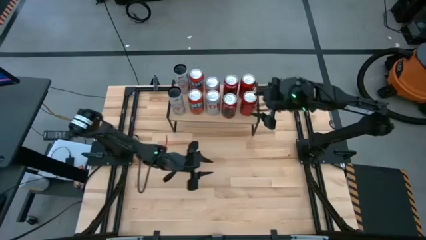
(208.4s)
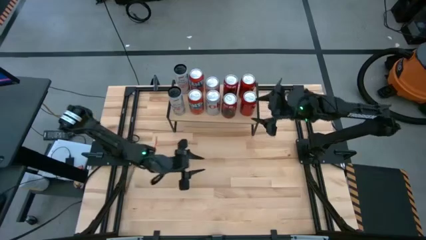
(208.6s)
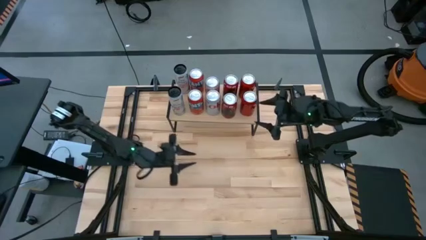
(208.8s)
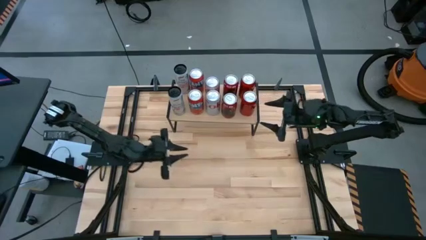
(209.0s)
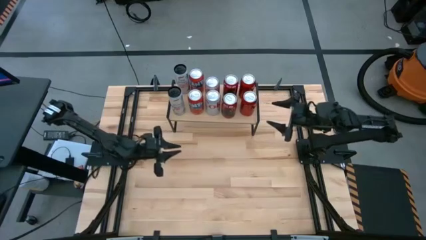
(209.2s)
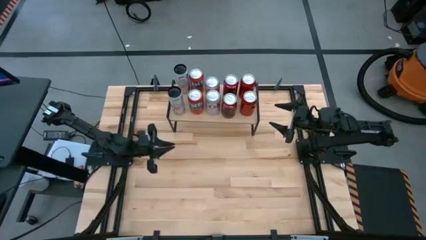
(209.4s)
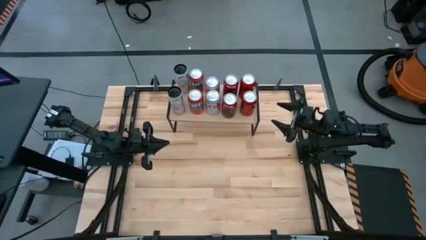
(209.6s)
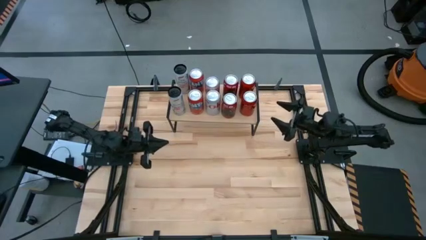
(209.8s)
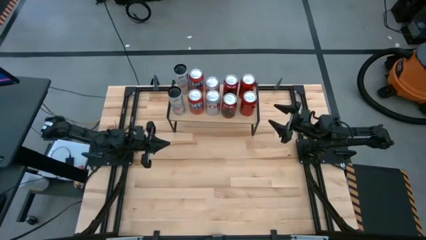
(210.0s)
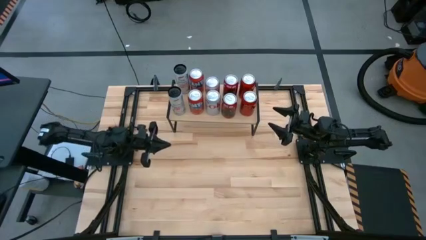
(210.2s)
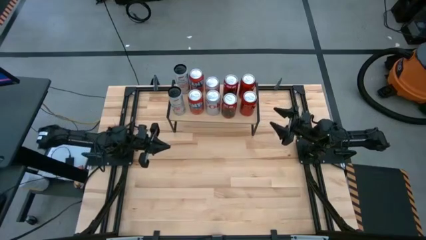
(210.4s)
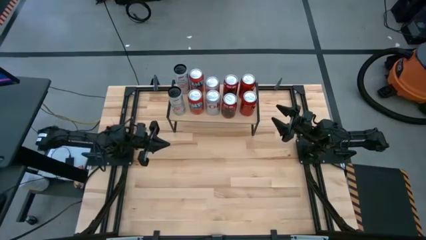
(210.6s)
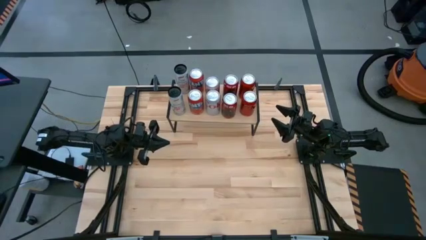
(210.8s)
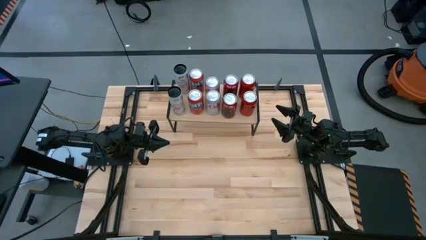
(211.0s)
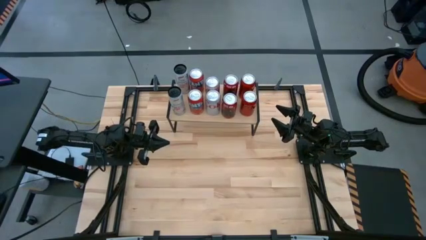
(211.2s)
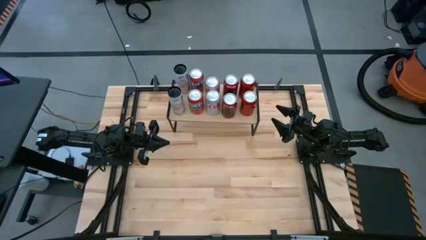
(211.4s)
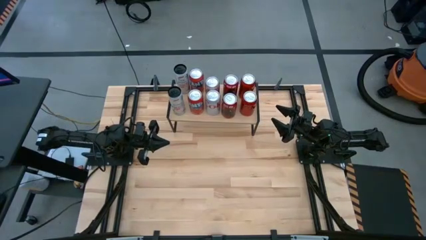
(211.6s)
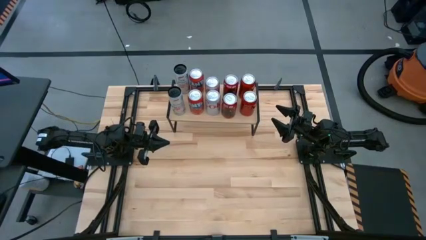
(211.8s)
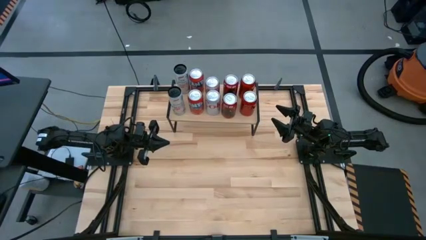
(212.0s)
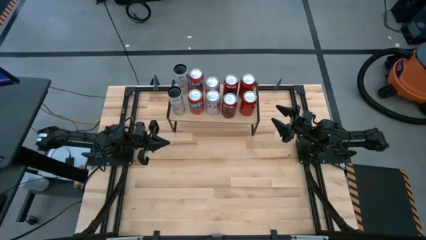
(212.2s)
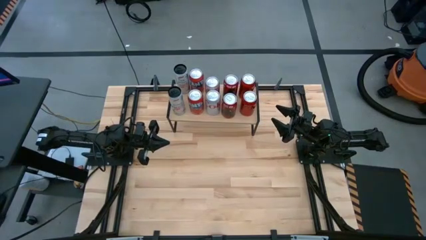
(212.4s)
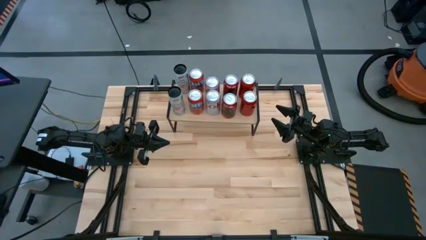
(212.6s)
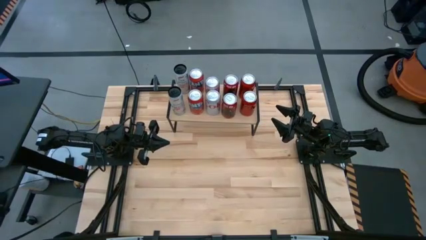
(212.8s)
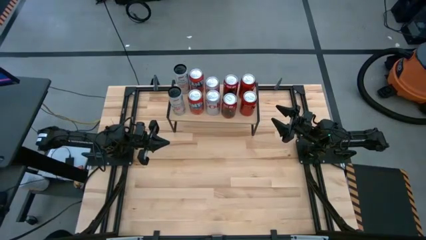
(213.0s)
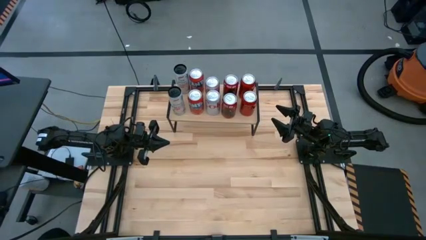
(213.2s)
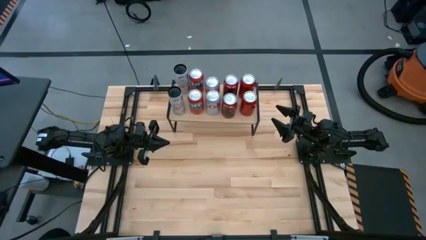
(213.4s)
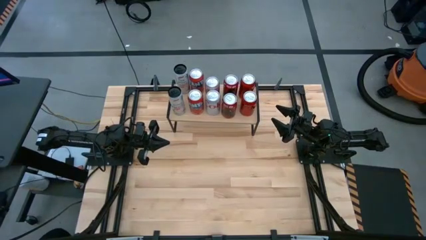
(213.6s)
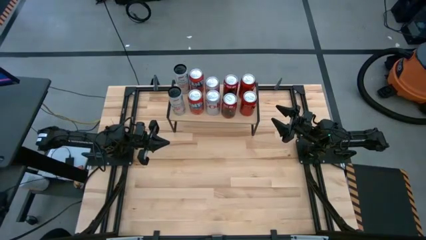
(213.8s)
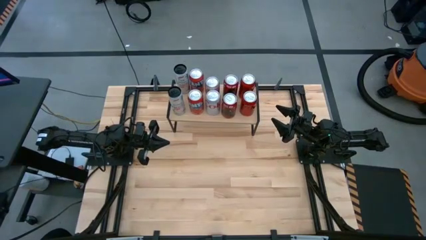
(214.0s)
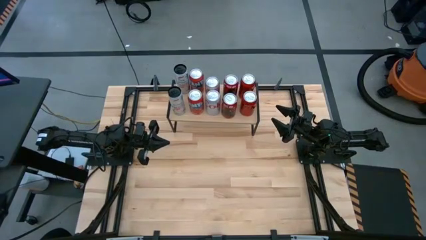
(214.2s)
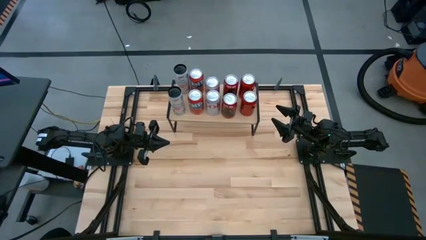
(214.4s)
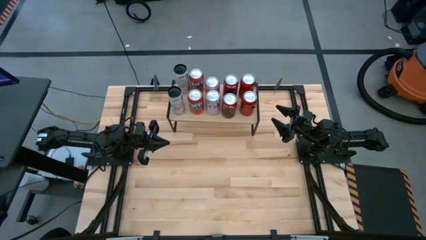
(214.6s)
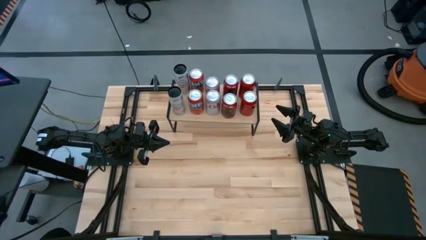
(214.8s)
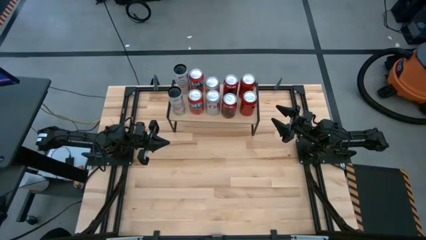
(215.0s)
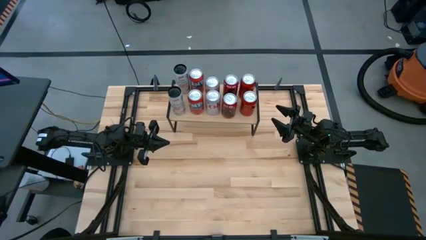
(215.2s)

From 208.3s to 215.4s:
Task: Place canned beverage on shelf
Return to home position

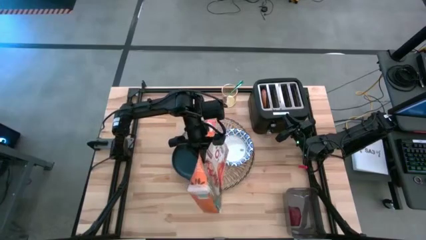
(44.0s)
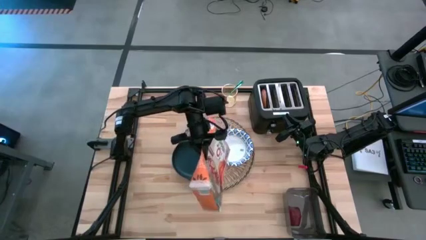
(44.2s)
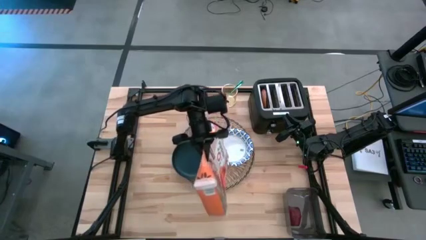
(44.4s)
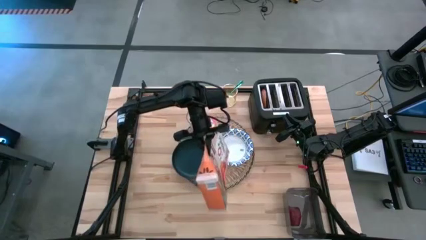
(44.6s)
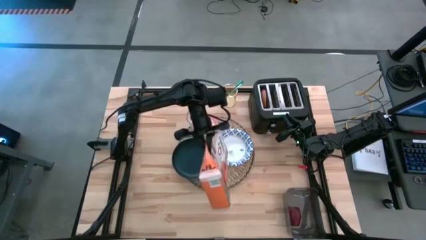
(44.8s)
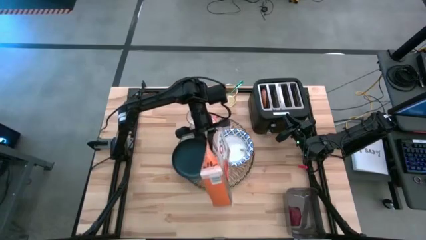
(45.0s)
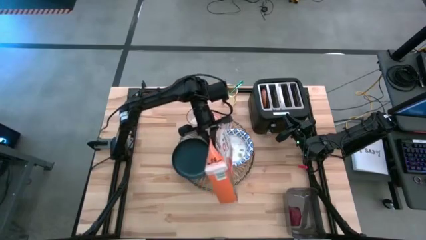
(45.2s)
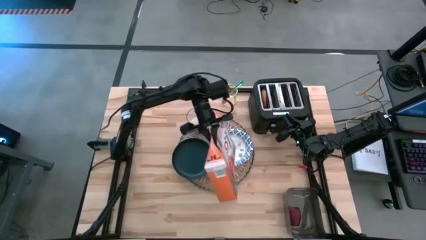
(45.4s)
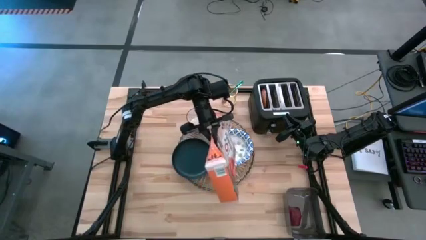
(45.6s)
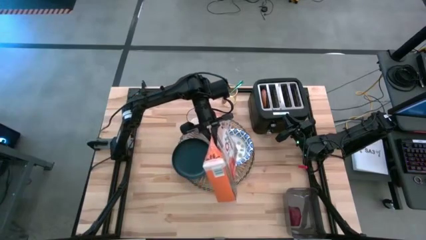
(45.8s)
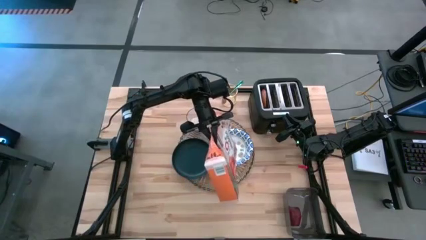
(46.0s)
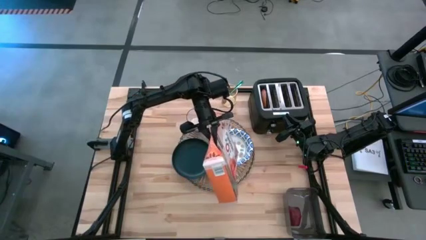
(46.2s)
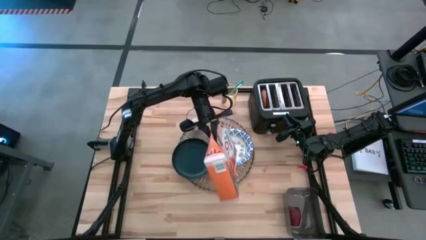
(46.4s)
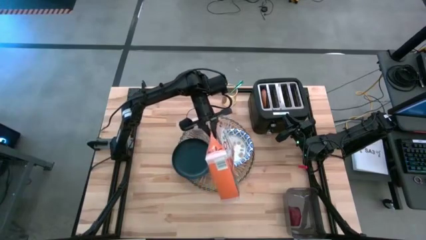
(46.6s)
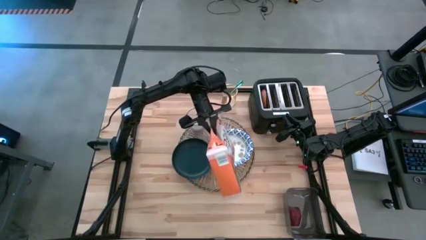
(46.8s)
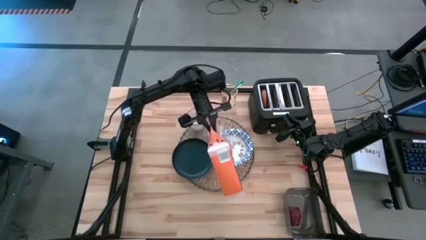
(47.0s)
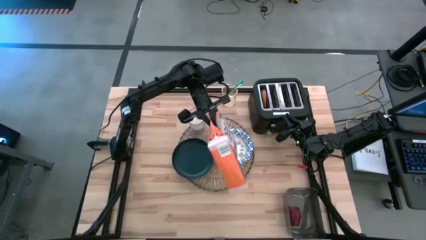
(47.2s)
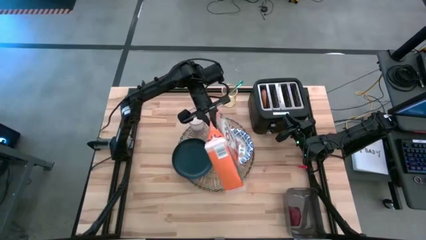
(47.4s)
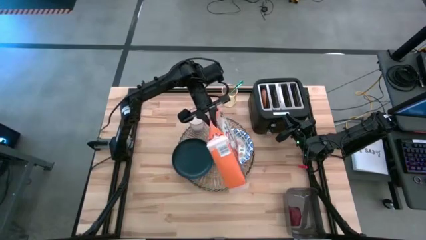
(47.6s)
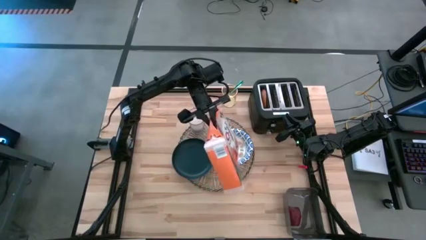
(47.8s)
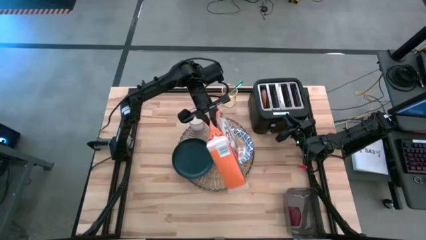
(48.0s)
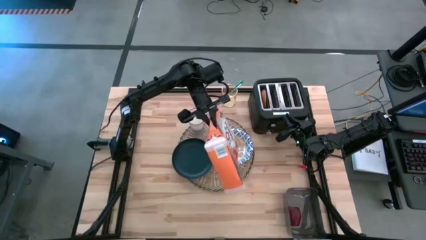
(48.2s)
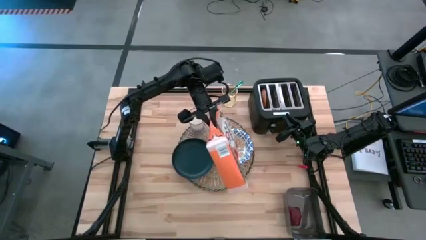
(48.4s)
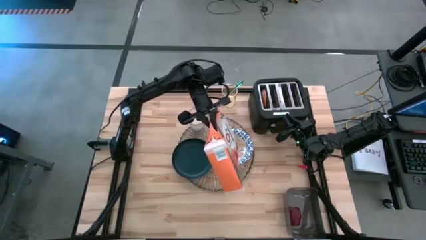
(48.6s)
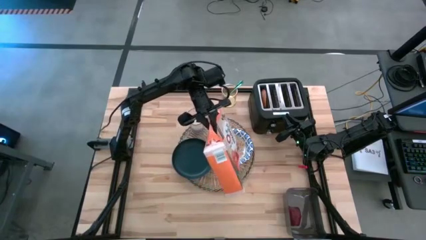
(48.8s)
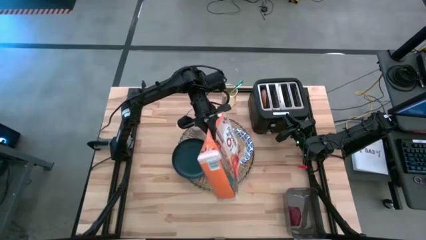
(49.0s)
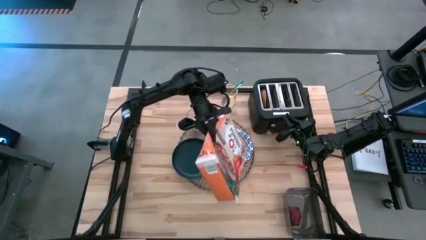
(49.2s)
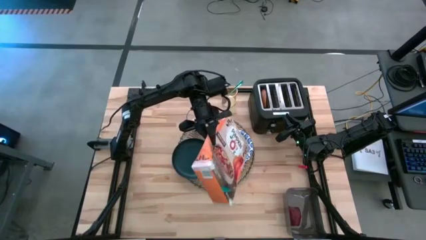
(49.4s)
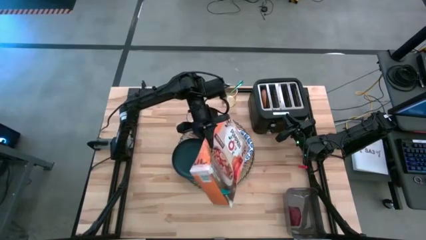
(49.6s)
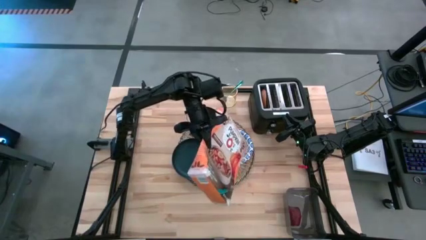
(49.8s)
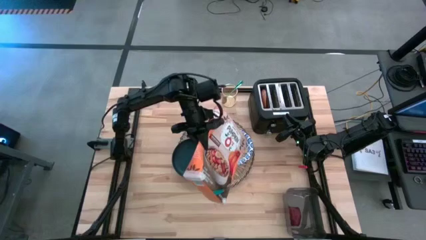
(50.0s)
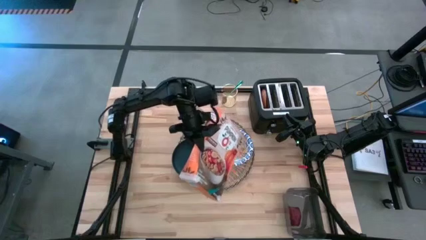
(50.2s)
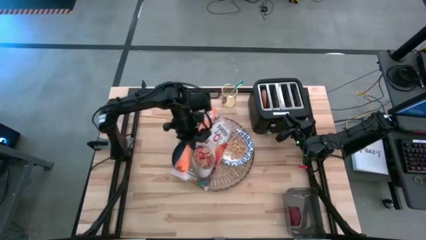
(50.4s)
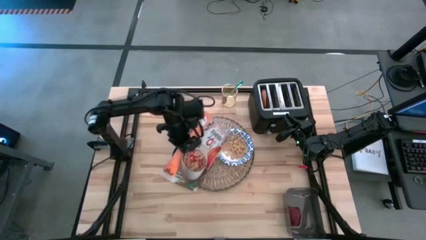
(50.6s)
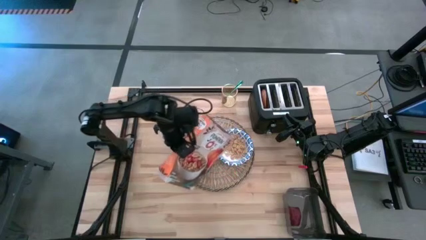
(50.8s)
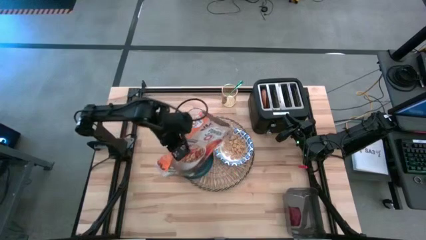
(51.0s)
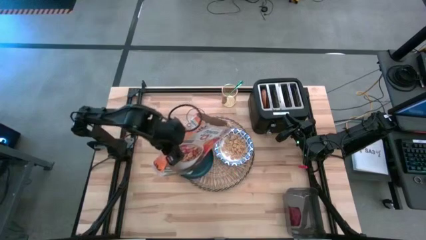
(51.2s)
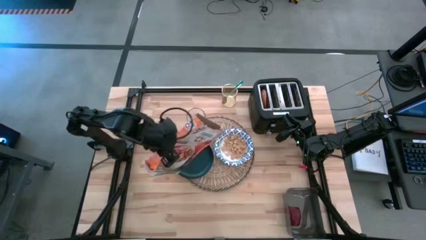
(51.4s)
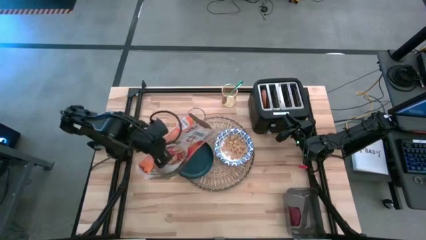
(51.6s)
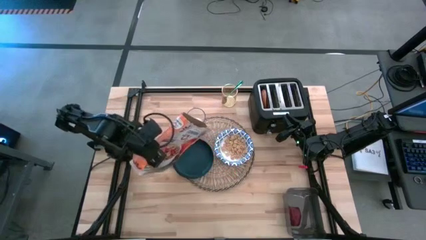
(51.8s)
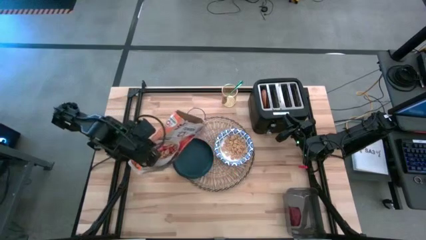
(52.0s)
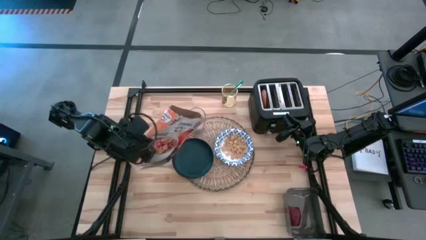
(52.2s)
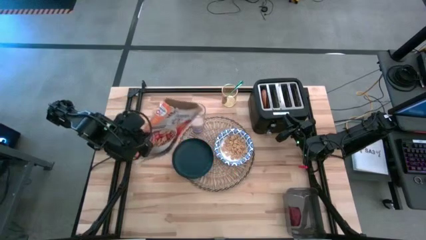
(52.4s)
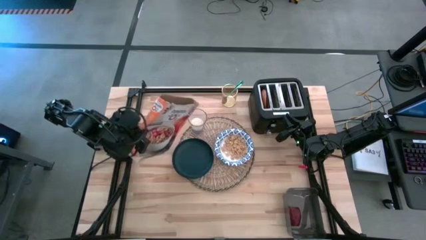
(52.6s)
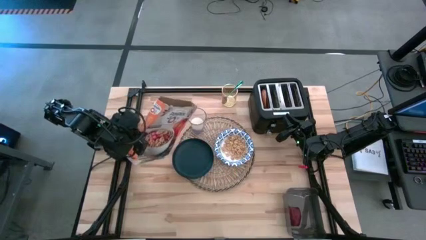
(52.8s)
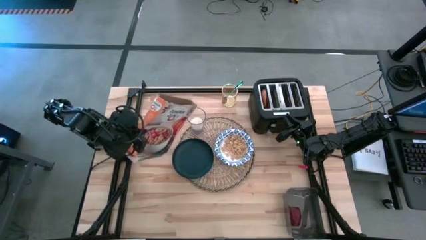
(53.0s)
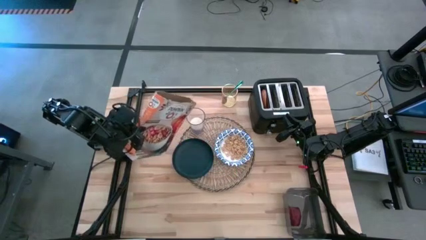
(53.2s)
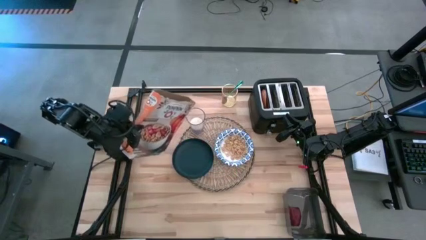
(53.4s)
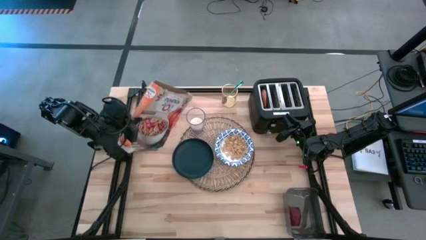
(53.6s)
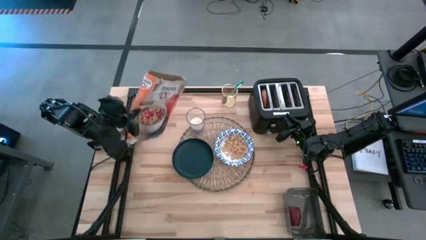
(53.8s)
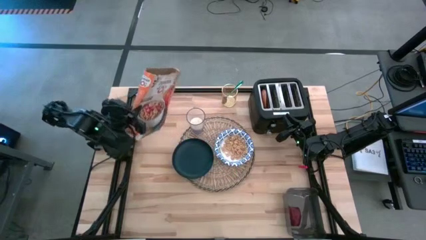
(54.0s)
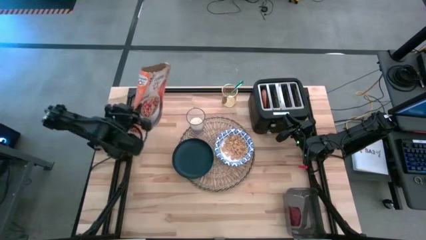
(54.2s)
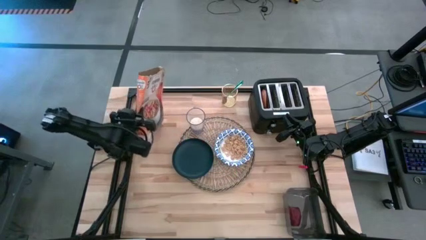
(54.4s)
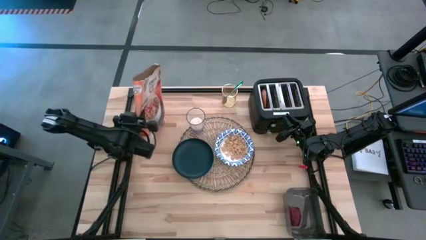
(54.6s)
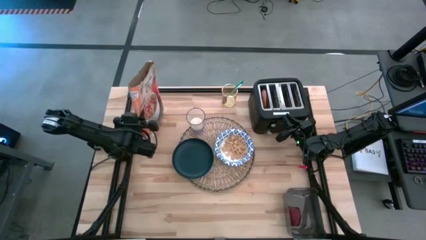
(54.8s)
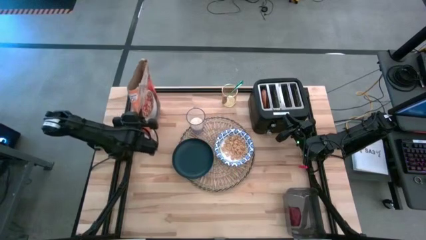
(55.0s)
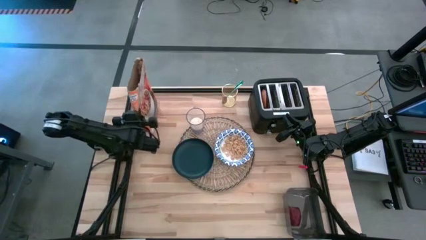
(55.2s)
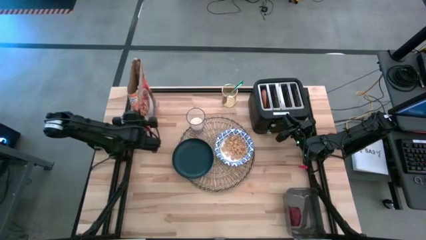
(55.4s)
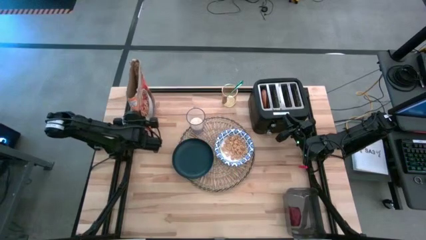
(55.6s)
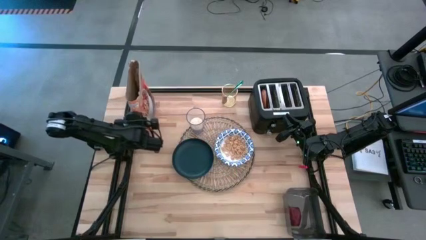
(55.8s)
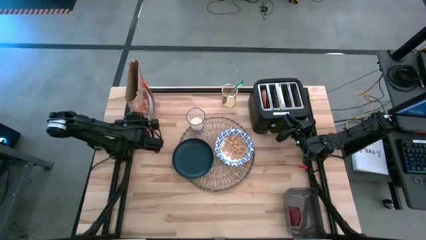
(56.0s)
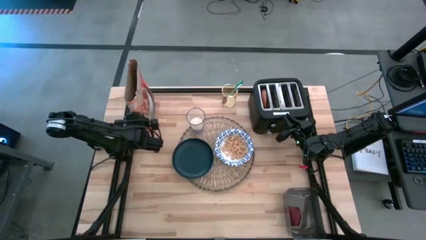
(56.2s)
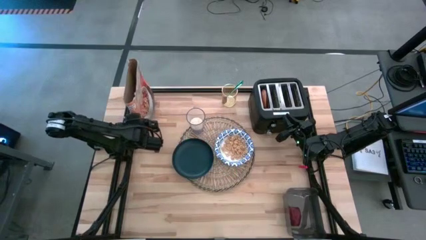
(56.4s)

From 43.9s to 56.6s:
Task: Arrange a breakfast setting
Pour the cereal from the orange cereal box into the white bowl on the brown placemat
